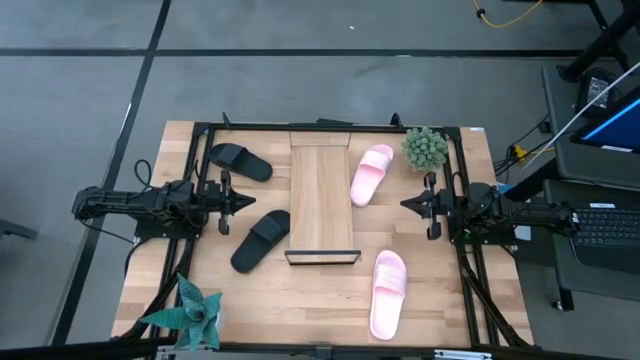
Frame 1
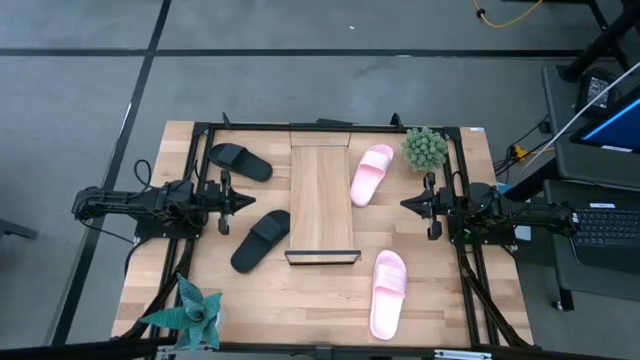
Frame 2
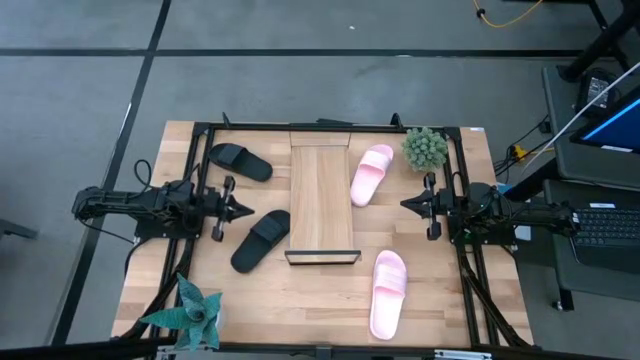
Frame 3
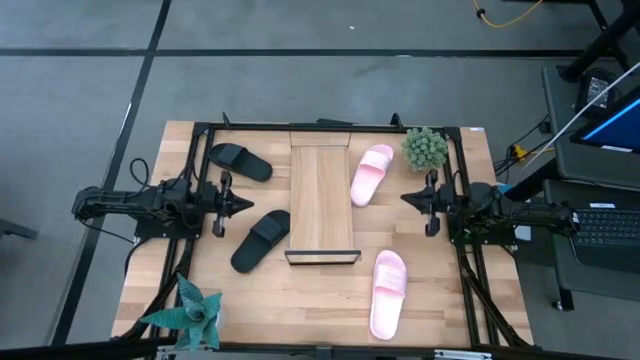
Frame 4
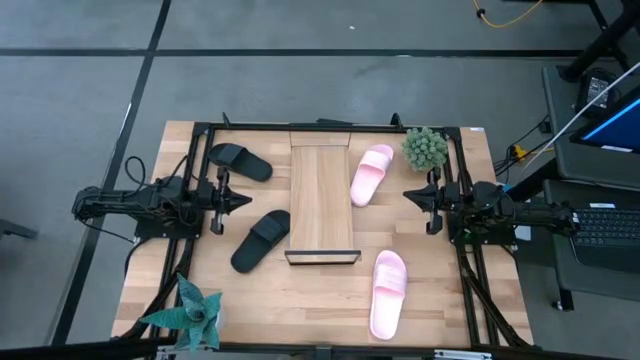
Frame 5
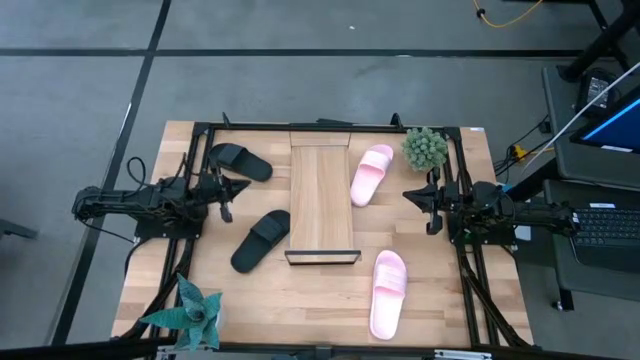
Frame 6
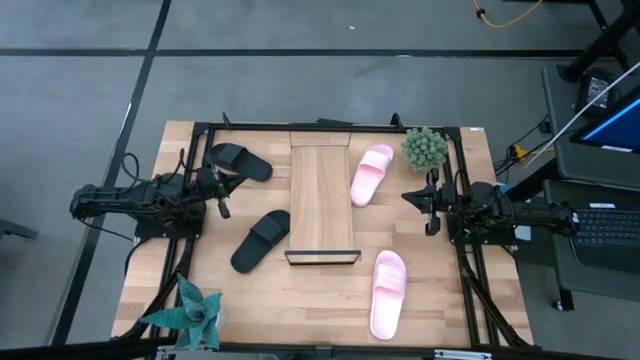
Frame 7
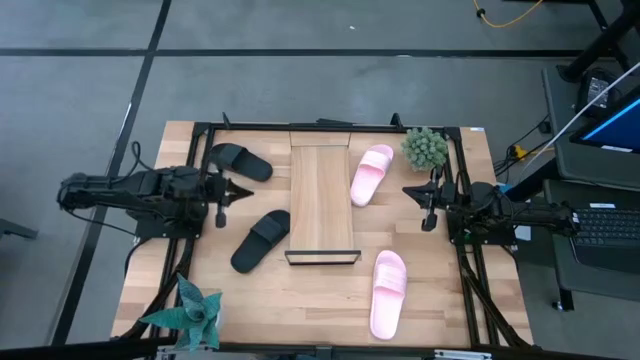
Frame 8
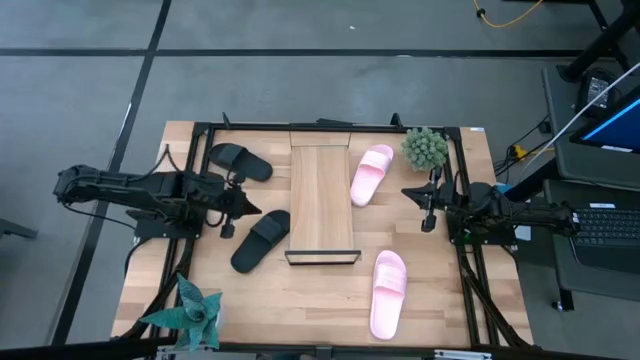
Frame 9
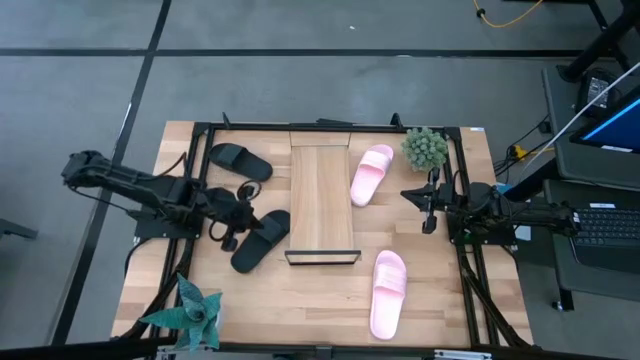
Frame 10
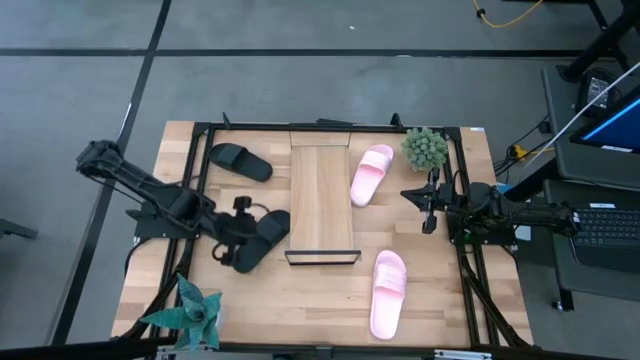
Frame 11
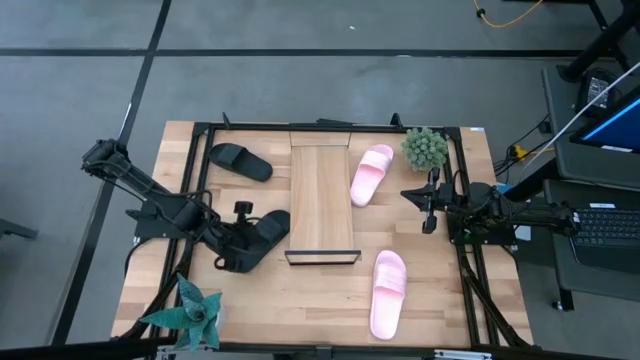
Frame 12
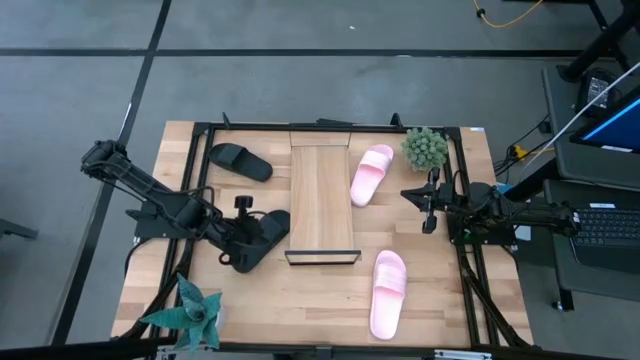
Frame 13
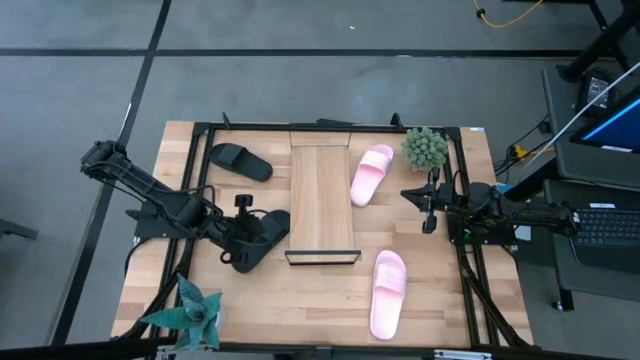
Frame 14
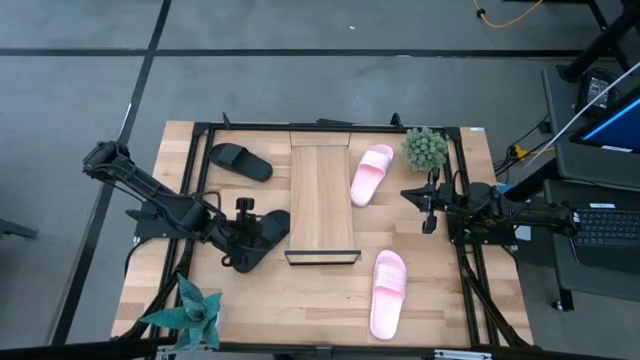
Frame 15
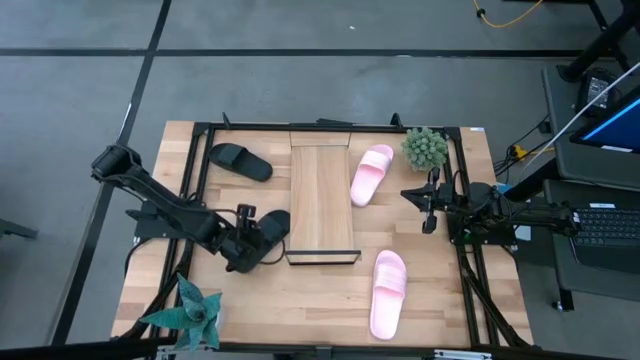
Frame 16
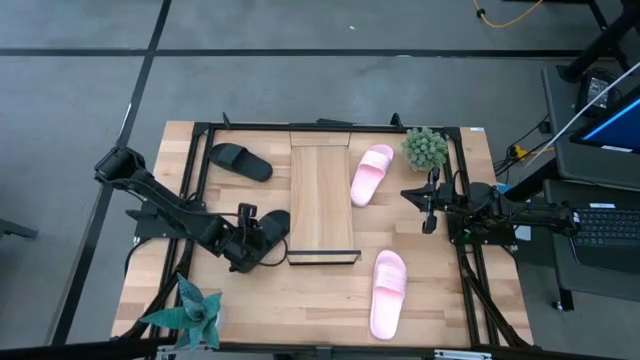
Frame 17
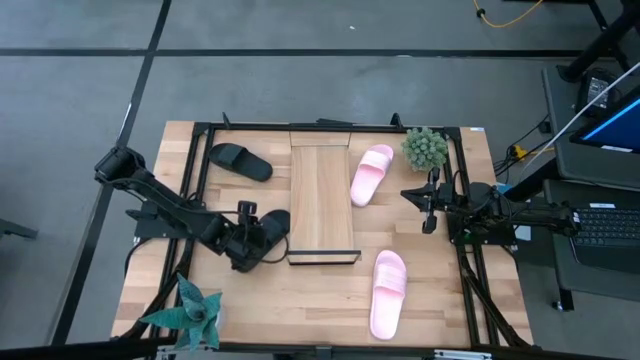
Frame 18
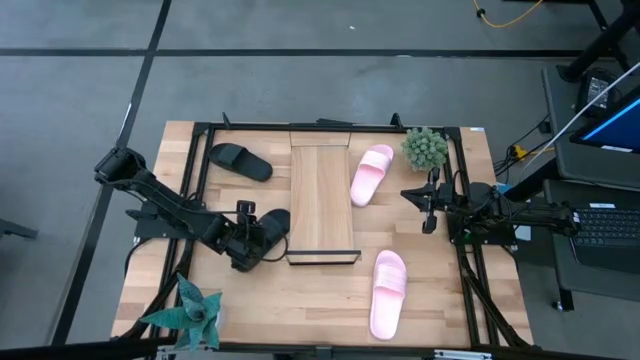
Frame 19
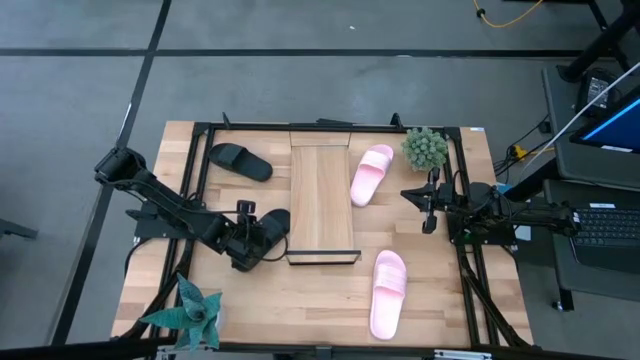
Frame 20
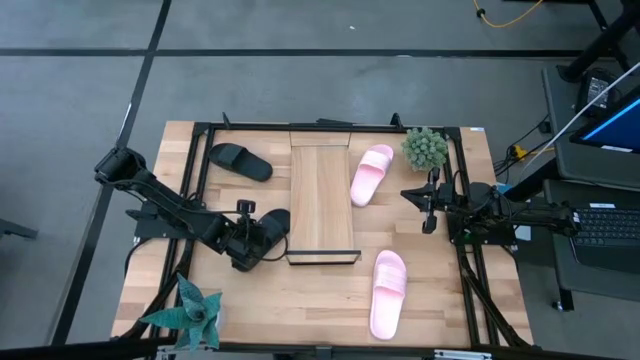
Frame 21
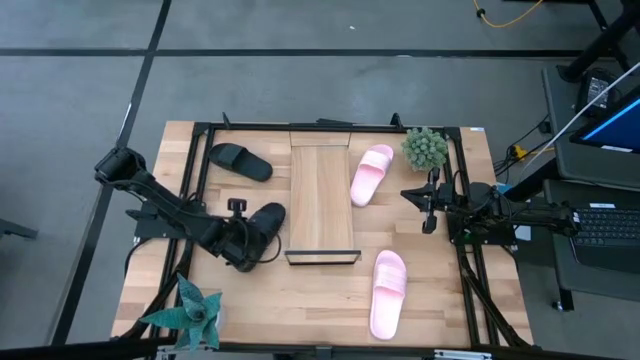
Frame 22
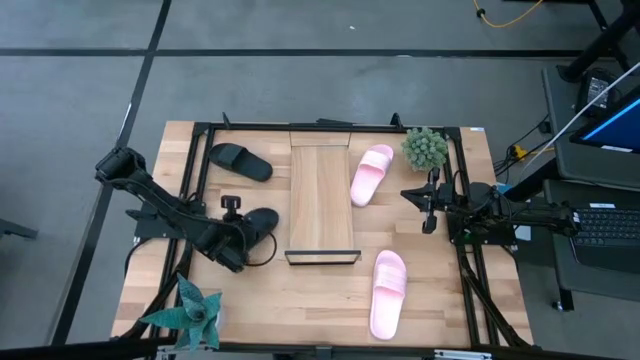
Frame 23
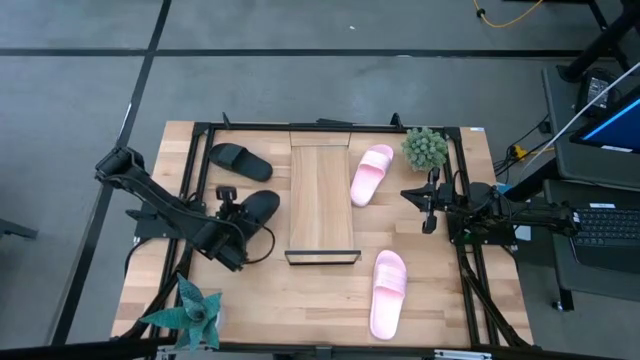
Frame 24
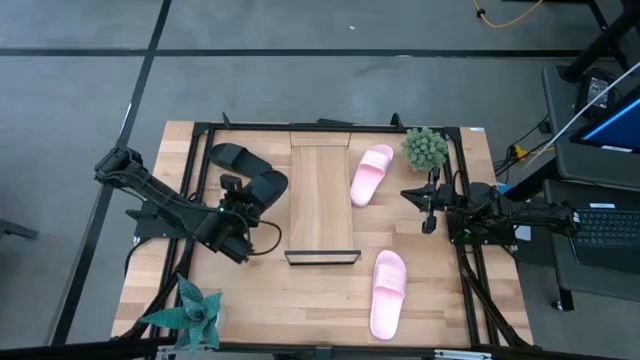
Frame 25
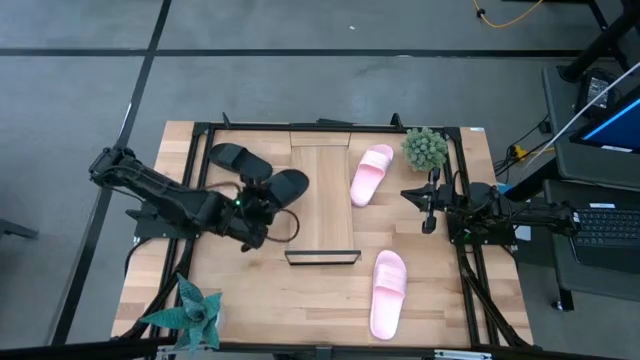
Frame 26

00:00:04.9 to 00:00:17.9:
Task: Pick and place slides into the shelf
Put the bottom black slide on the shelf

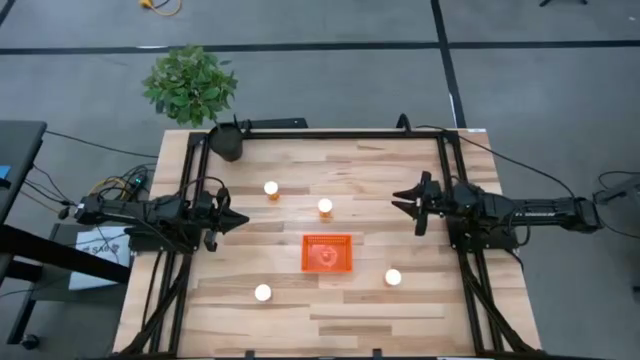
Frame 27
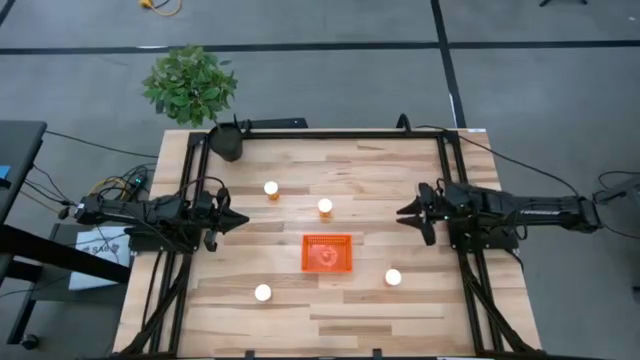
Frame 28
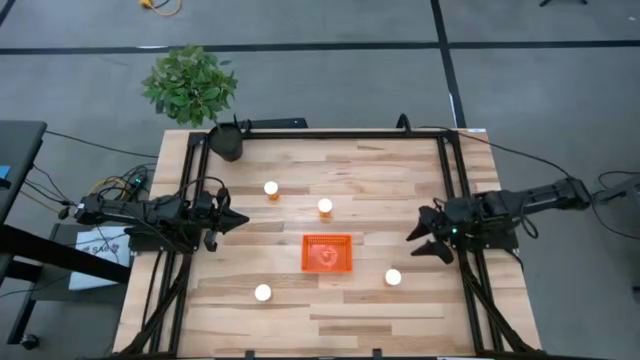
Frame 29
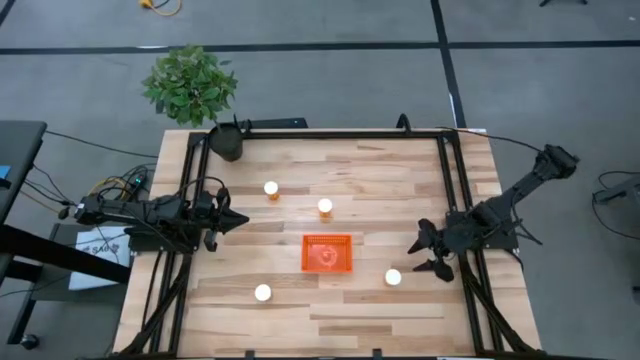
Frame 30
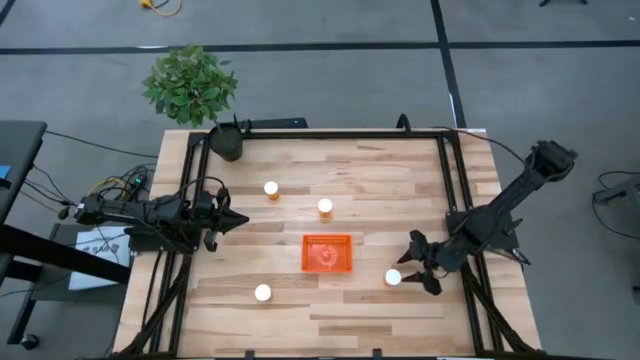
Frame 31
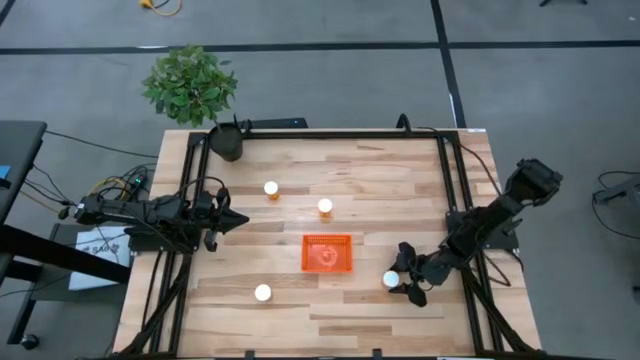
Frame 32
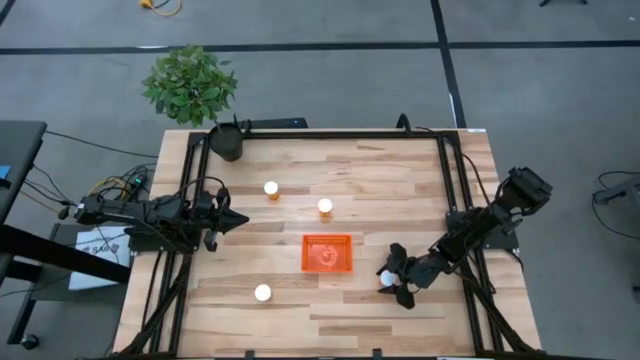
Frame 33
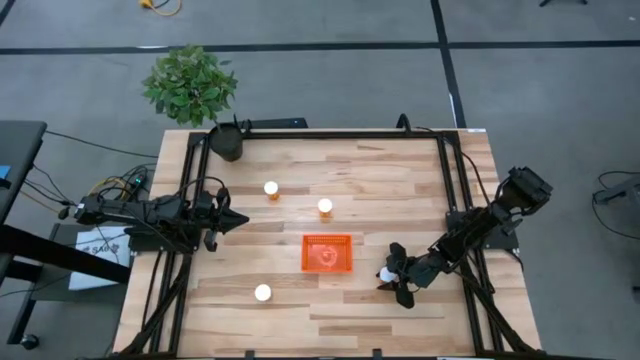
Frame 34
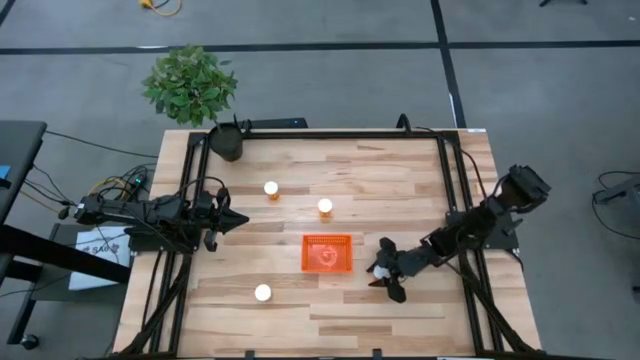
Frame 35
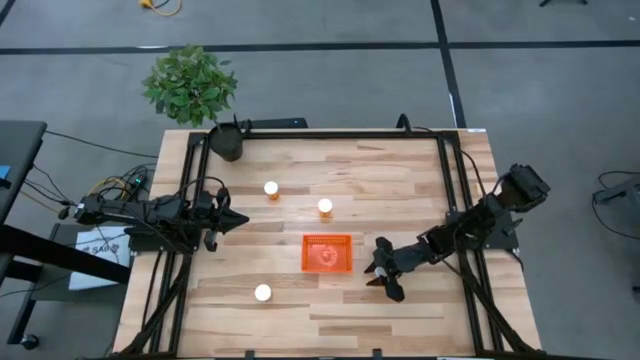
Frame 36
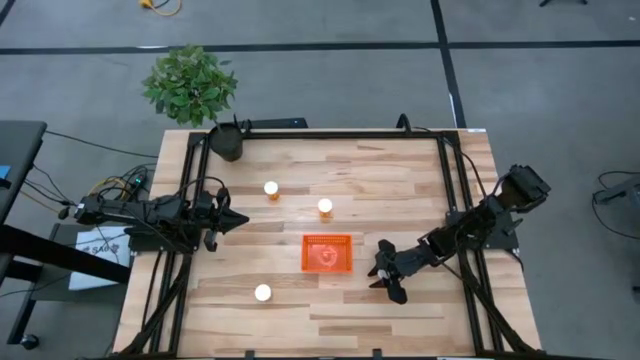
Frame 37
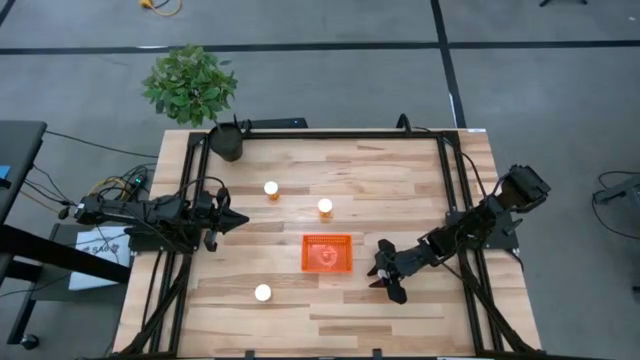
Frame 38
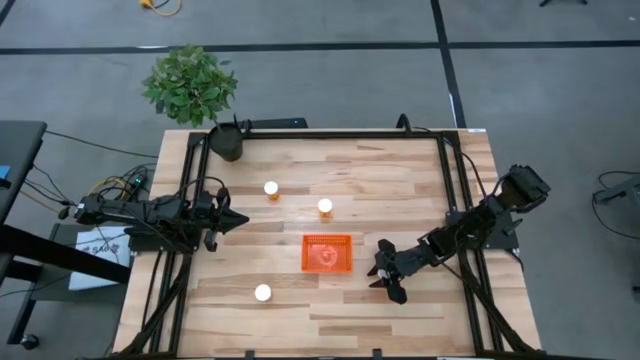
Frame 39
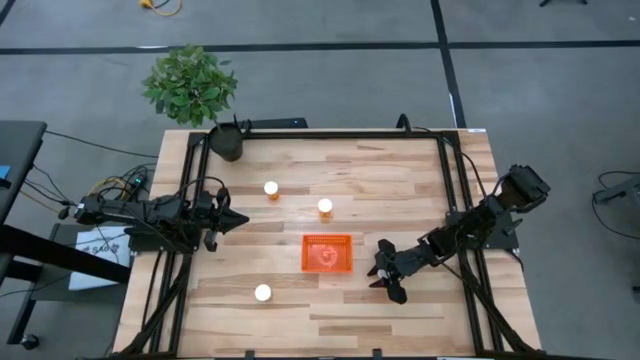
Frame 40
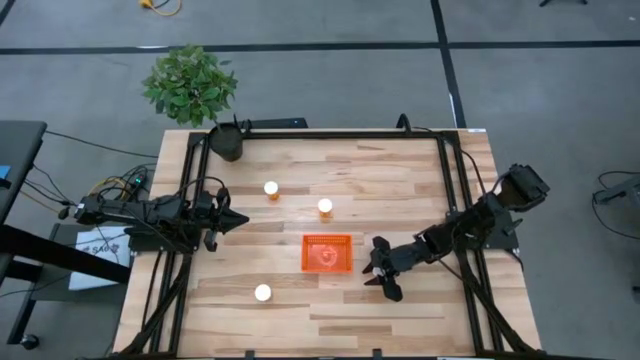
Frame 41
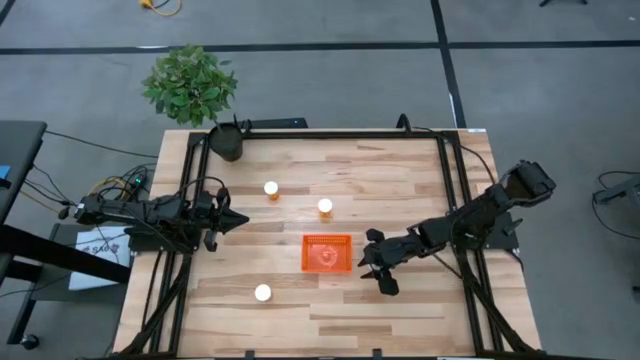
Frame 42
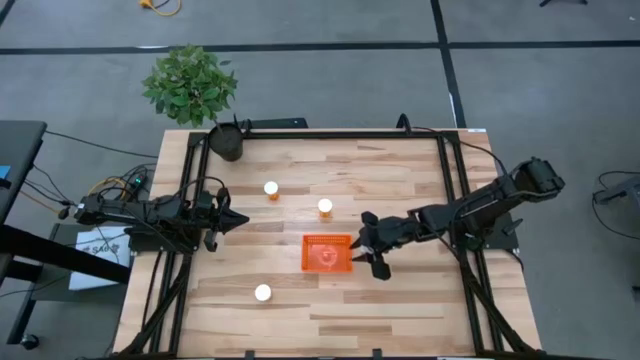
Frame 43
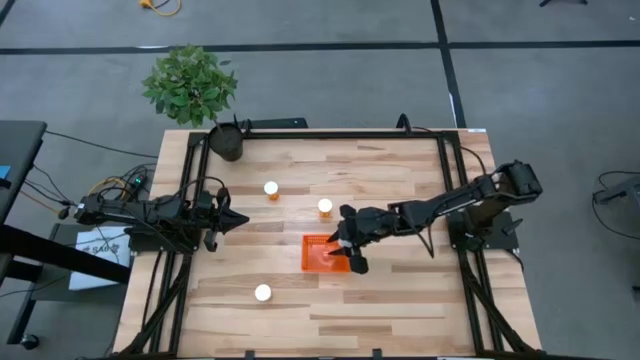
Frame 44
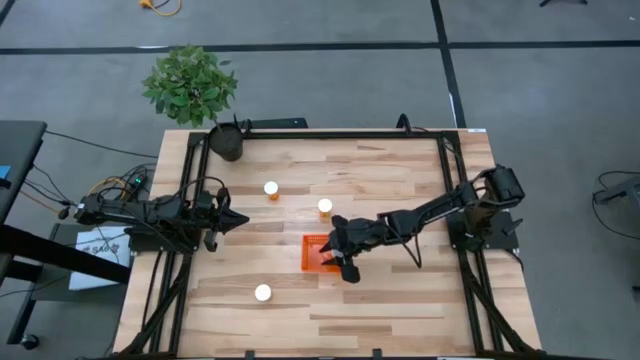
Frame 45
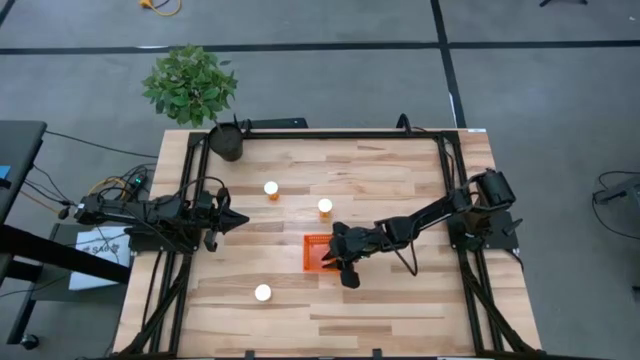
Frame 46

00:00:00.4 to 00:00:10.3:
Task: Pick and place pill bottles into a basket
Put the orange pill bottle into the orange bin
